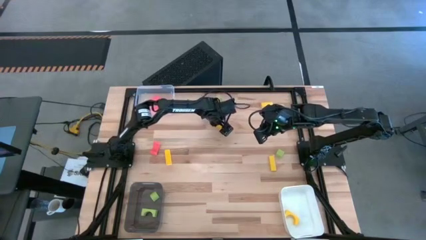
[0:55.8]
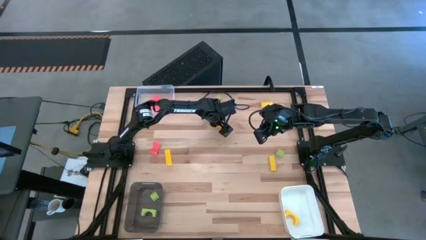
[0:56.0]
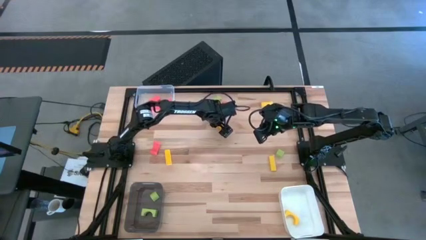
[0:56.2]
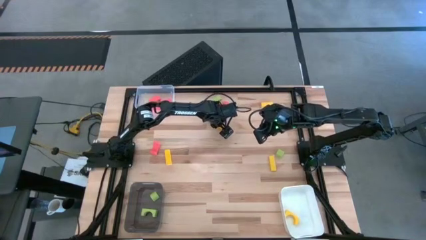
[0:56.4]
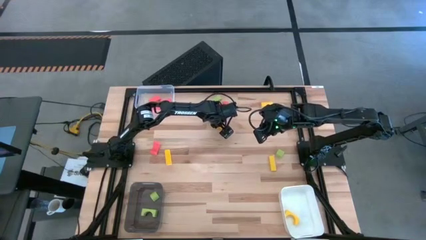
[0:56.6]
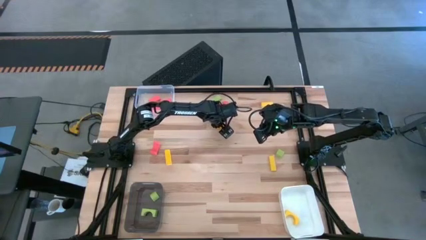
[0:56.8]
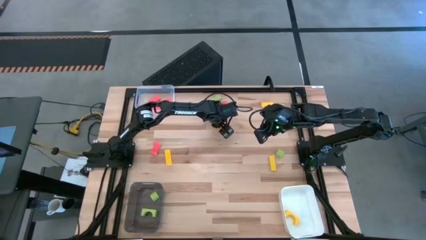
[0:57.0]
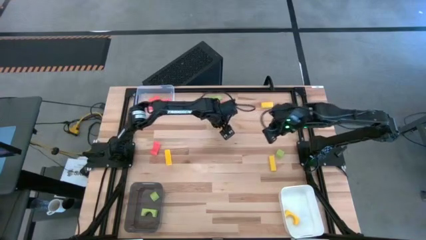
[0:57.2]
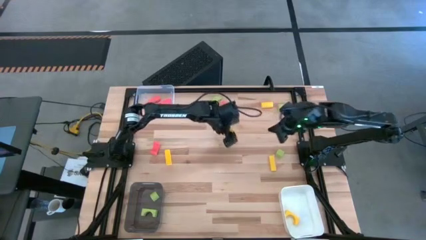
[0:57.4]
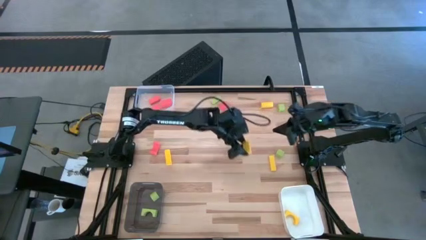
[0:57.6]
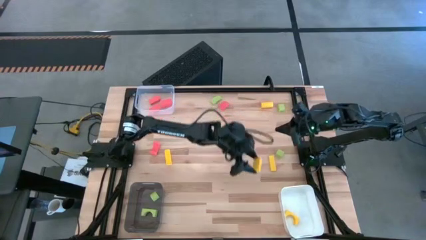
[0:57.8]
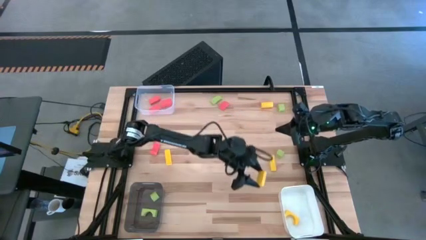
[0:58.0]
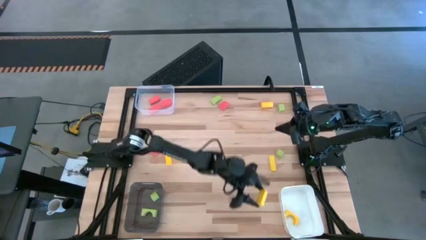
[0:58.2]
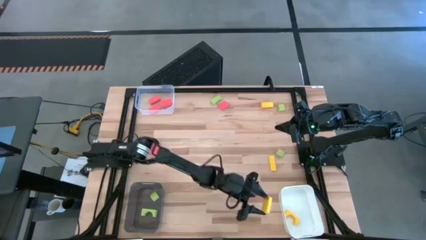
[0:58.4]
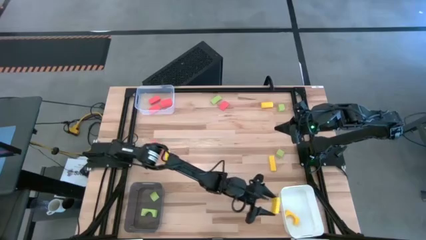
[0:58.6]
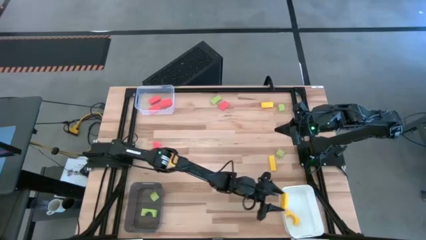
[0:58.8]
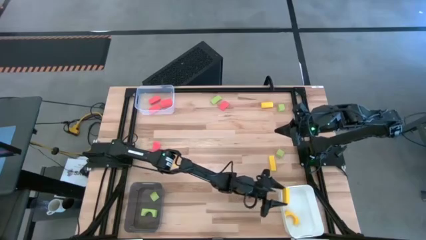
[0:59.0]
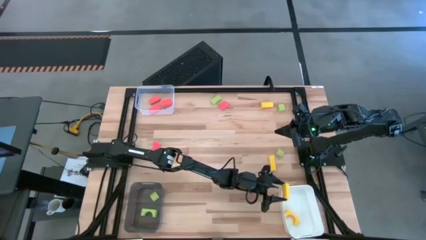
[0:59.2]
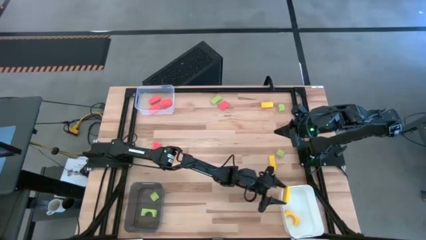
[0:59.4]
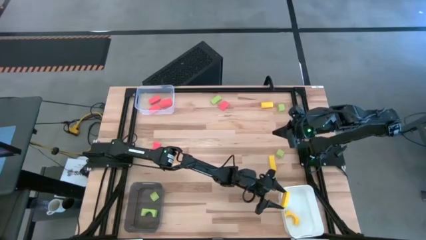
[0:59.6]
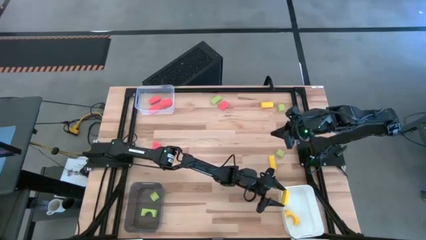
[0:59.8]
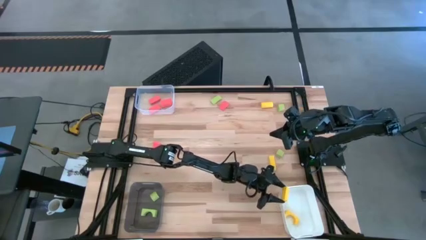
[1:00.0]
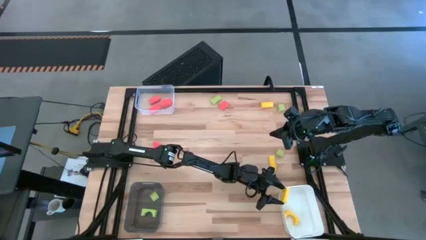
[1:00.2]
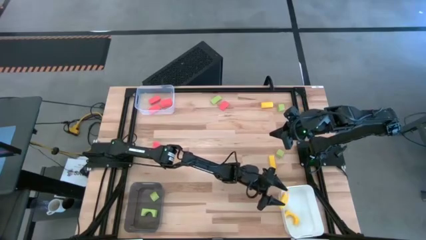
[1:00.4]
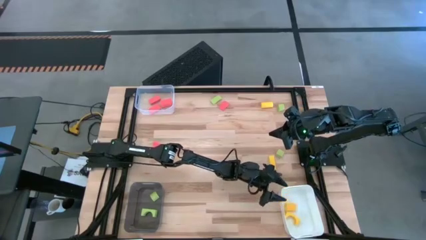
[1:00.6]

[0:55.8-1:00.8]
Task: Sort & place blocks by color
Put the yellow block into the white bin

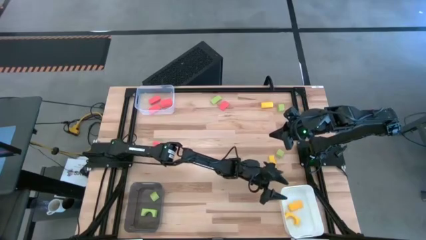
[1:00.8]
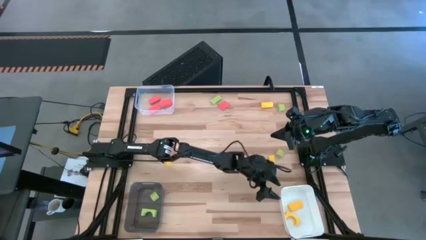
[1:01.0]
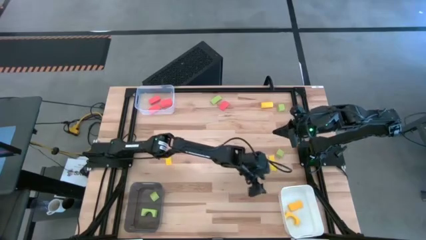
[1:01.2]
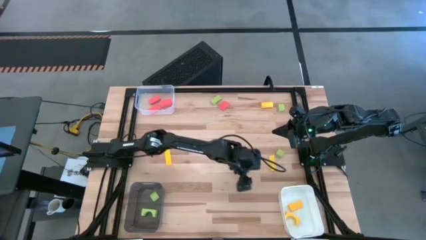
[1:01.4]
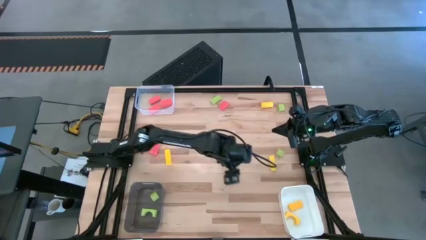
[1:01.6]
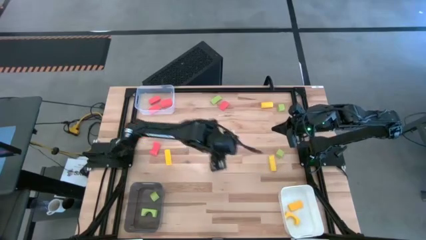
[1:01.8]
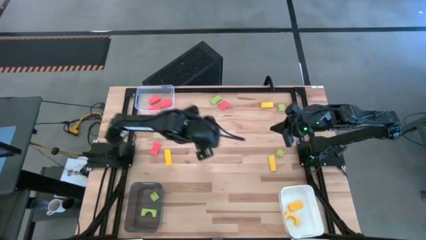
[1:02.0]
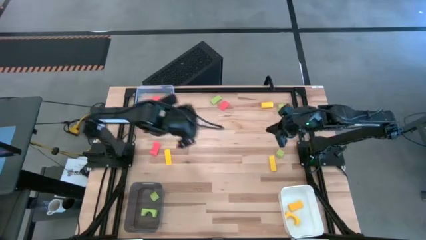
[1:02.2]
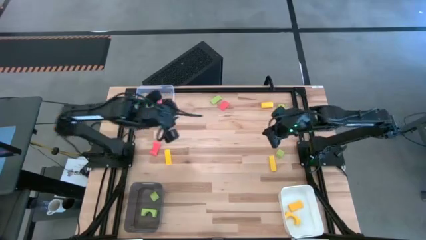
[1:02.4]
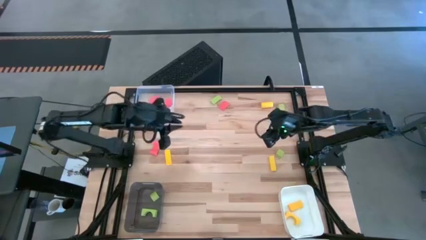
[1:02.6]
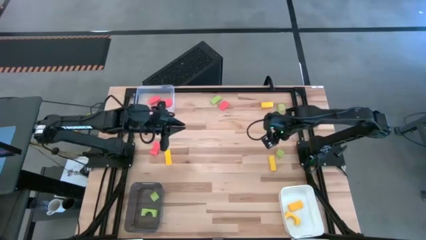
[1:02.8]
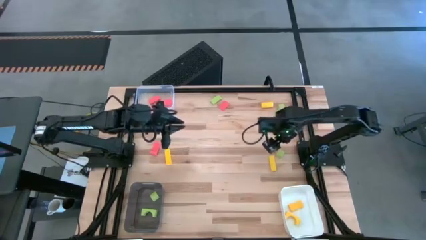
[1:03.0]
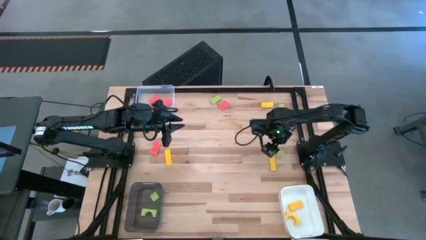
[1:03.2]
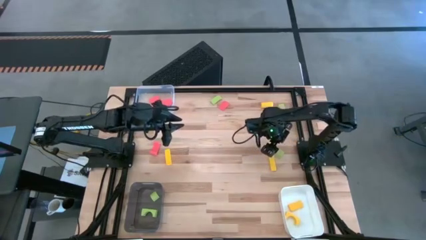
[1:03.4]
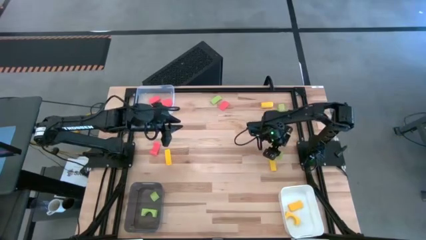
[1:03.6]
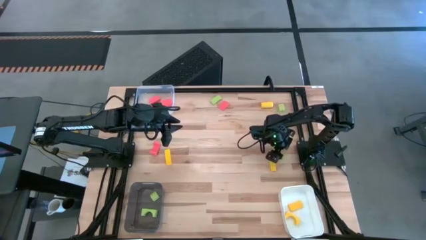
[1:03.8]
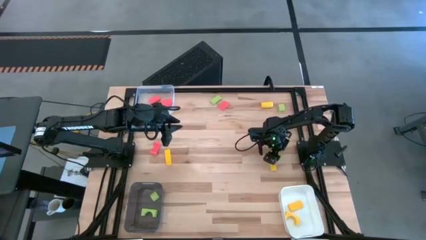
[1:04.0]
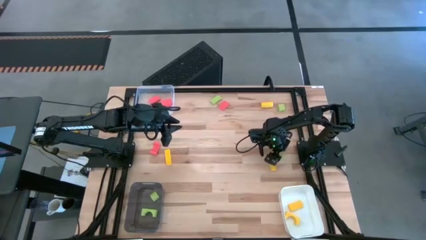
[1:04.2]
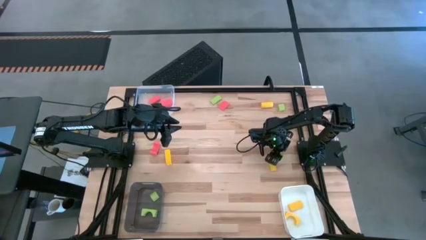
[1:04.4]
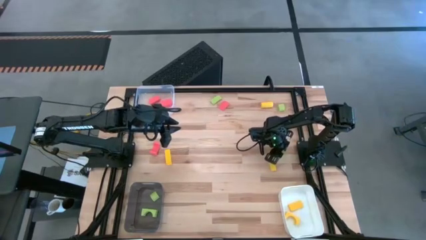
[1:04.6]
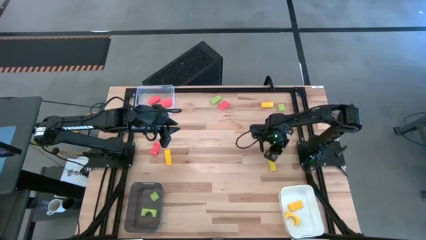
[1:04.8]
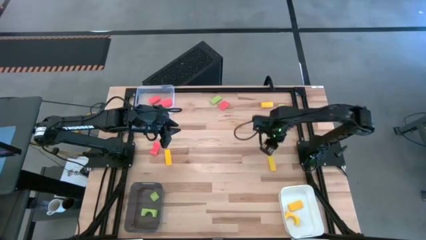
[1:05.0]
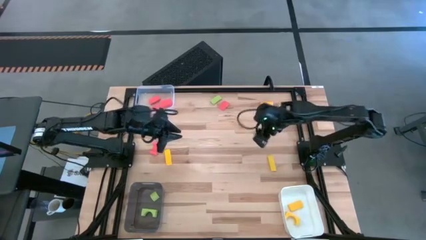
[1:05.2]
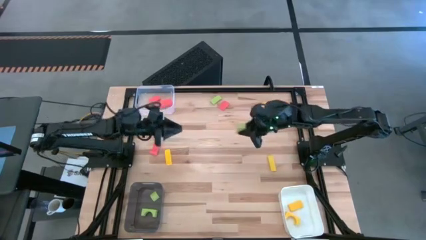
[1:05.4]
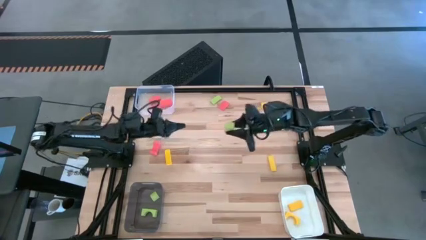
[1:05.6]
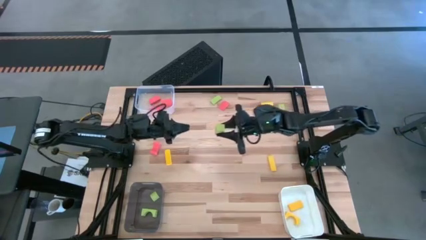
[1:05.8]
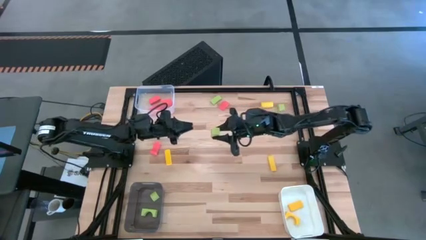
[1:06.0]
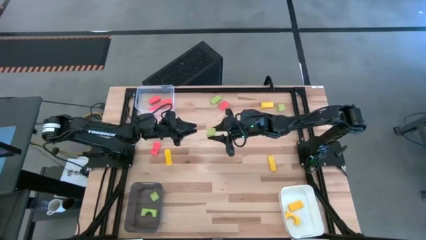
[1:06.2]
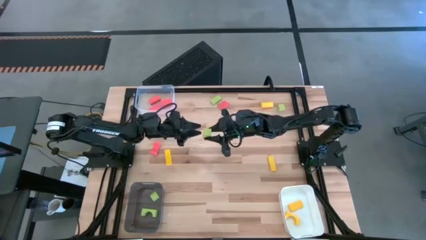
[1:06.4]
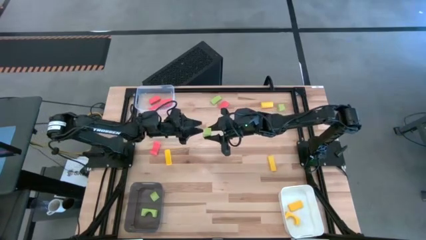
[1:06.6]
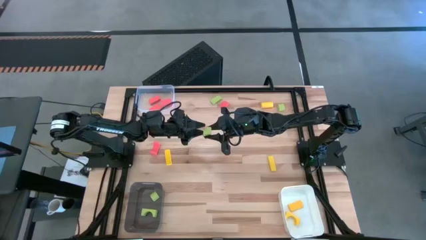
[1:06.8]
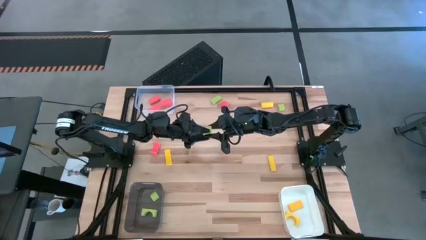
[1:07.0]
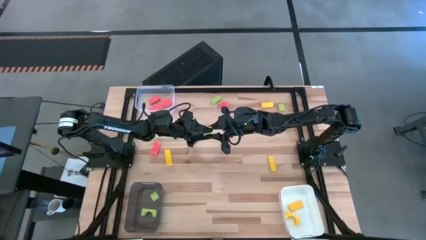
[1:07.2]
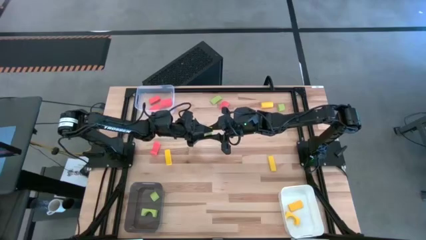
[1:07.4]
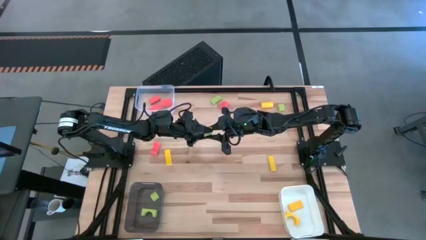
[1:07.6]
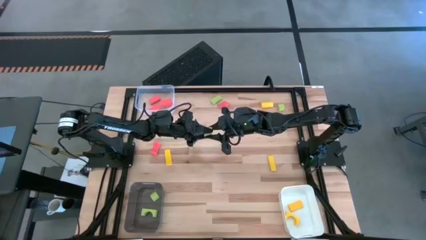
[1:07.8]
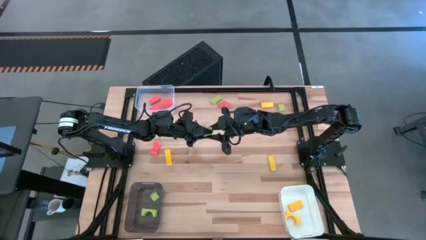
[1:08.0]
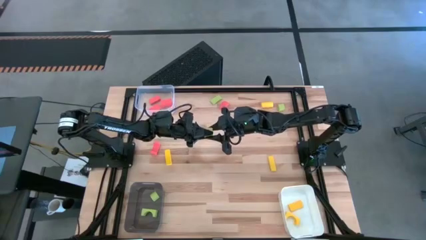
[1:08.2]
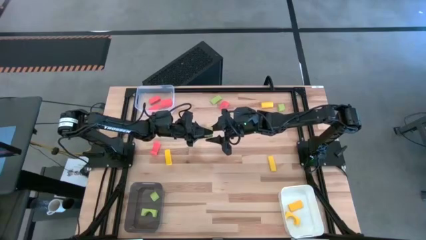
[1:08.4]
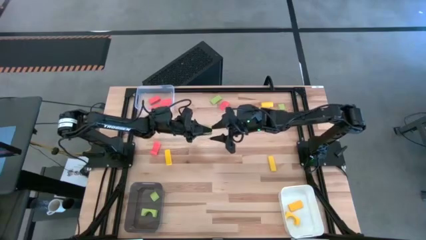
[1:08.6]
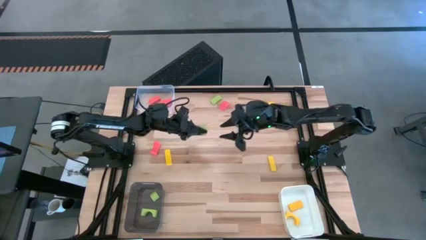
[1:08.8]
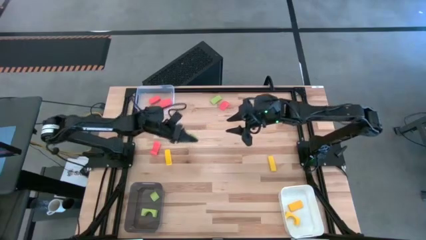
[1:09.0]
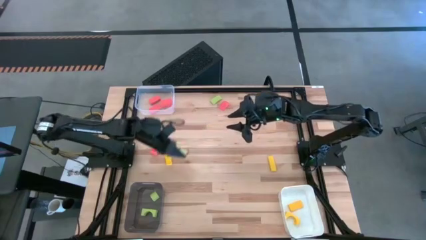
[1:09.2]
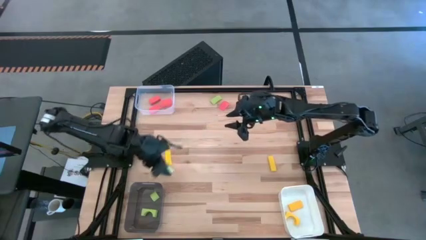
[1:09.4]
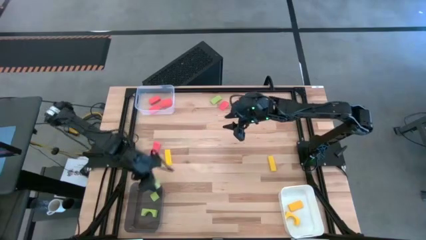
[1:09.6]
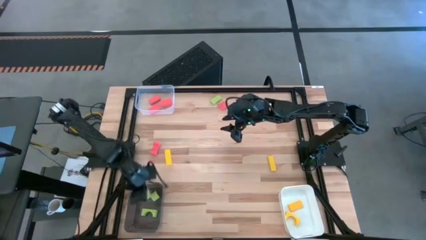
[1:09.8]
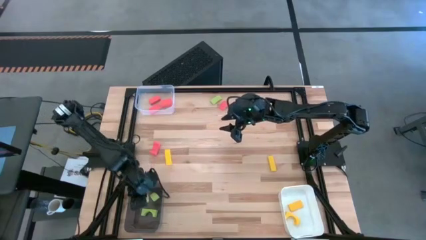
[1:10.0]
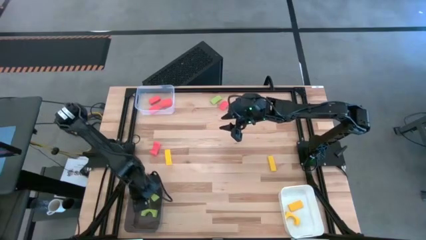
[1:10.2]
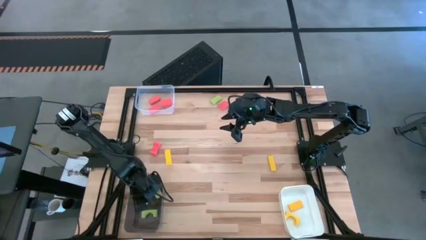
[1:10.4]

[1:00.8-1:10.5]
Put the green block into the black transparent bin

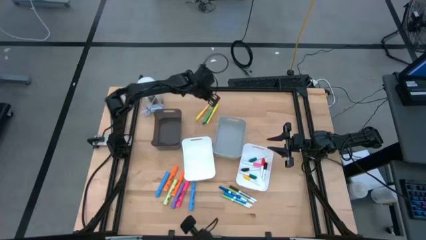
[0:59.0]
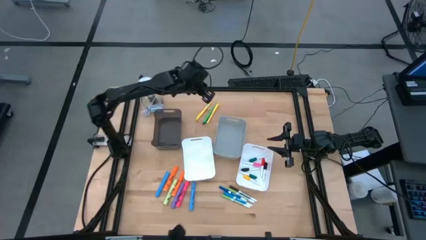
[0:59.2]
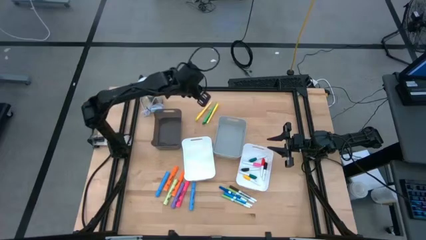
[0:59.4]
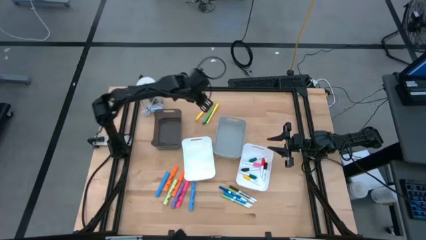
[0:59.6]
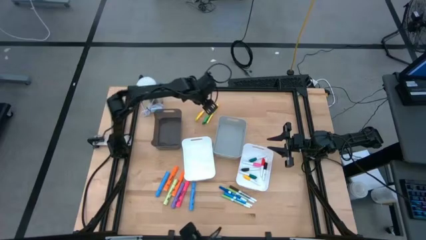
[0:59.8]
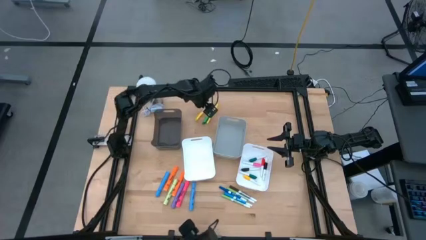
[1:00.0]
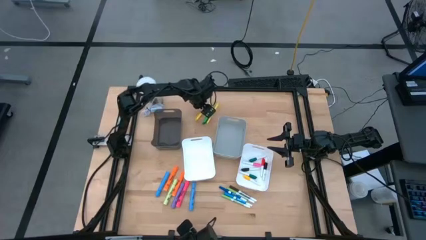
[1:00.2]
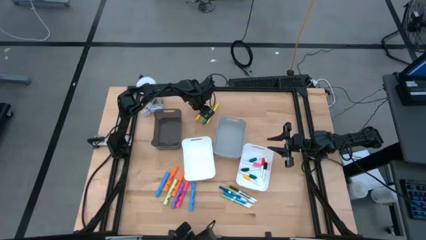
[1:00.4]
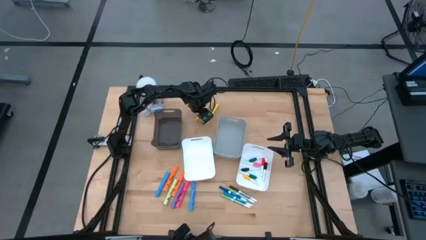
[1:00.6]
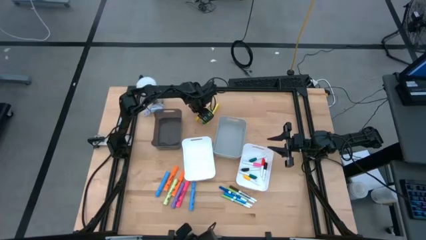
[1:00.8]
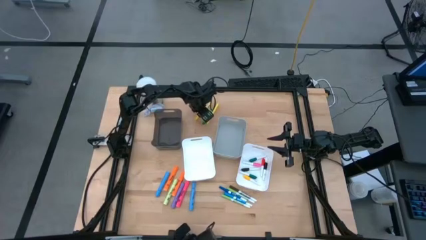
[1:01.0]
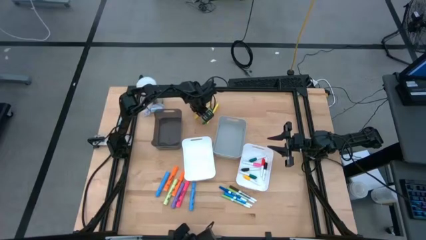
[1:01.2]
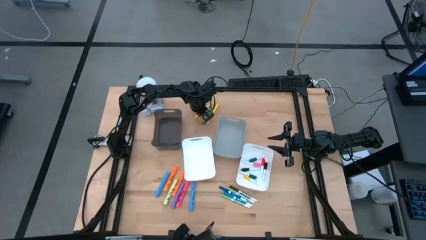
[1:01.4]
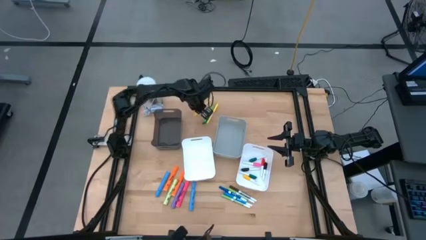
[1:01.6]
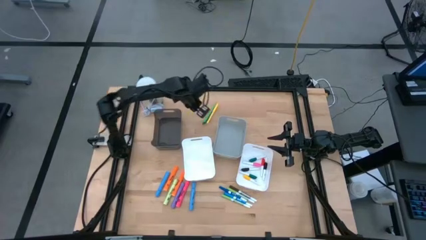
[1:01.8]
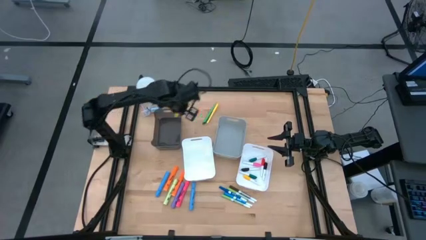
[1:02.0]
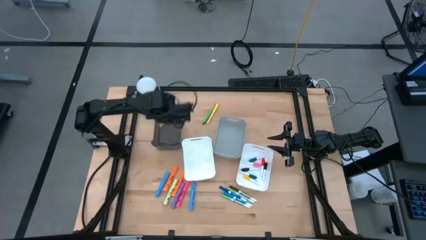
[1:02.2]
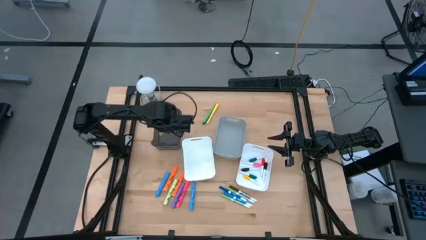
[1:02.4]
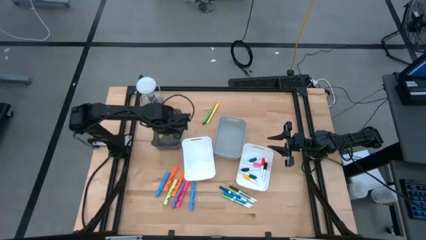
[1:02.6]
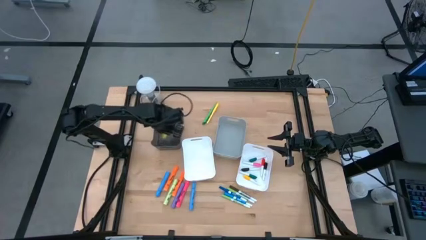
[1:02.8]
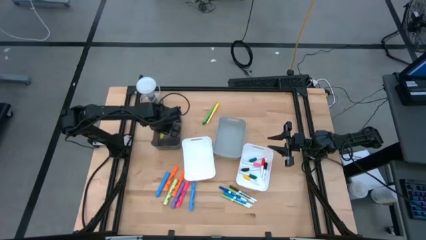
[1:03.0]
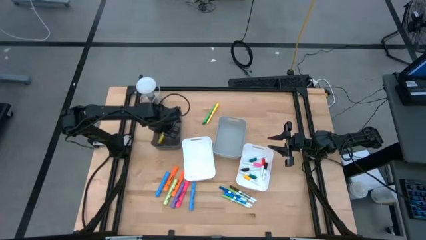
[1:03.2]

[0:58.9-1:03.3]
Task: Pick & Place Markers
Put the left yellow pen into the black bin
